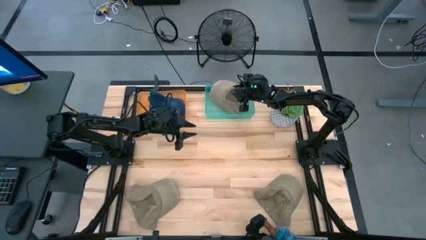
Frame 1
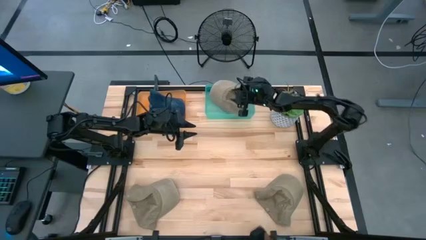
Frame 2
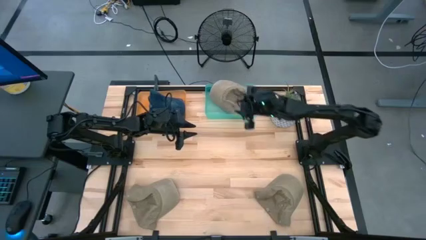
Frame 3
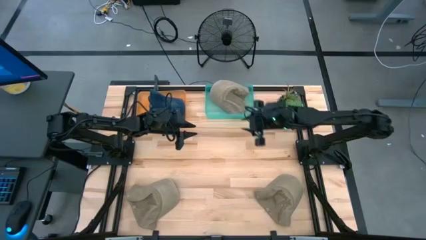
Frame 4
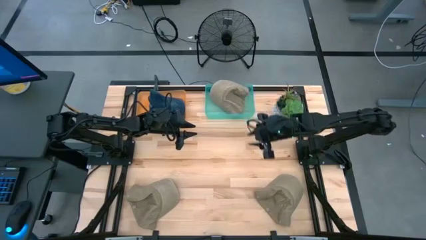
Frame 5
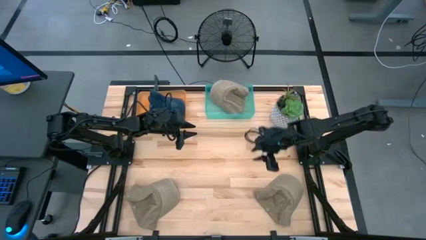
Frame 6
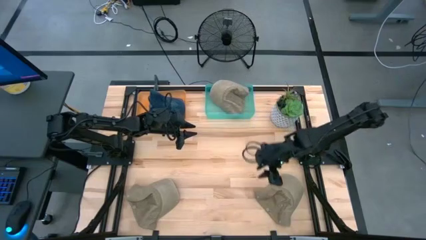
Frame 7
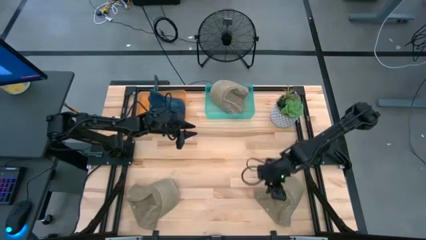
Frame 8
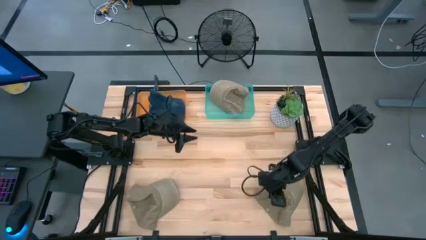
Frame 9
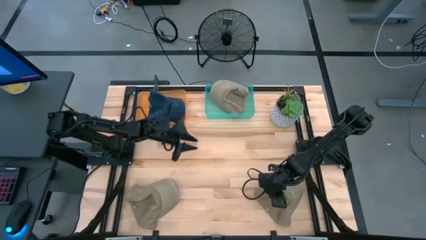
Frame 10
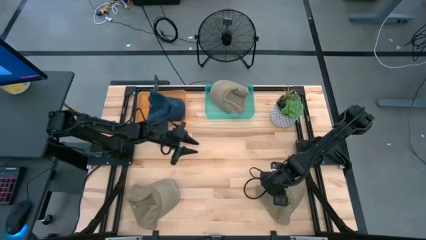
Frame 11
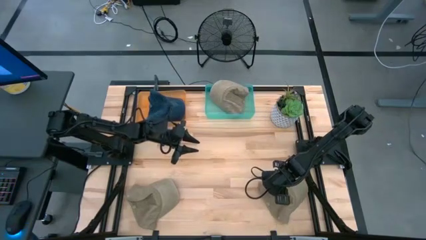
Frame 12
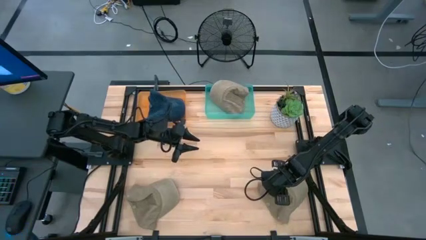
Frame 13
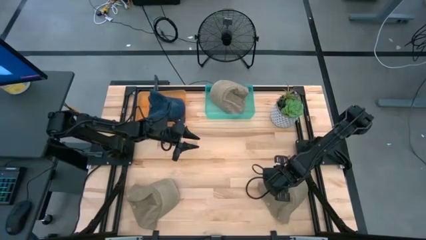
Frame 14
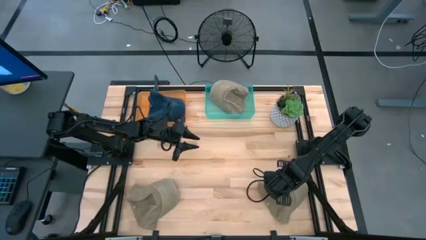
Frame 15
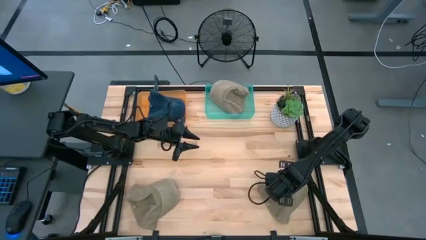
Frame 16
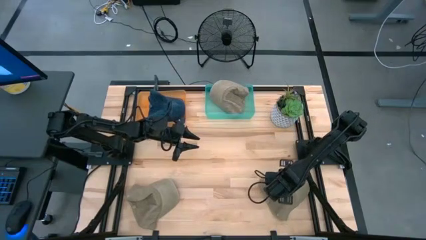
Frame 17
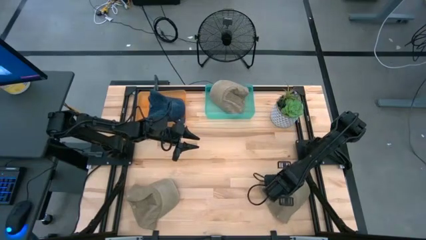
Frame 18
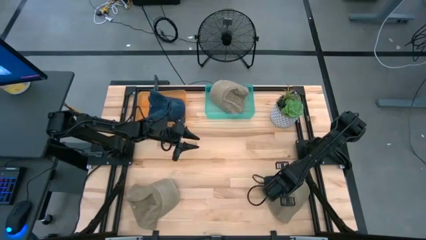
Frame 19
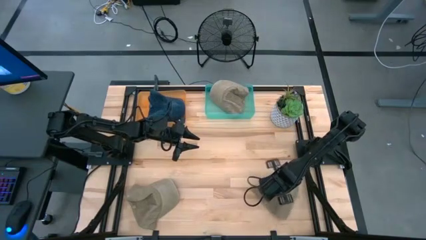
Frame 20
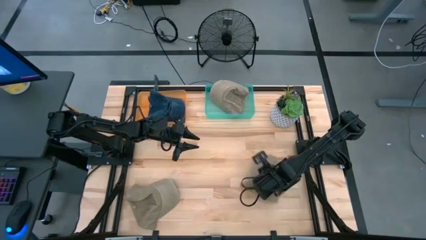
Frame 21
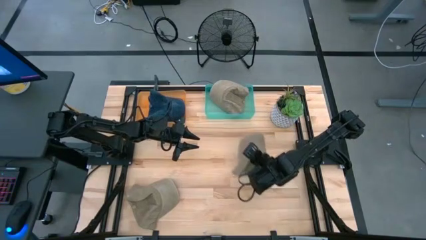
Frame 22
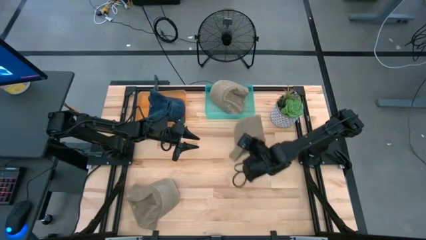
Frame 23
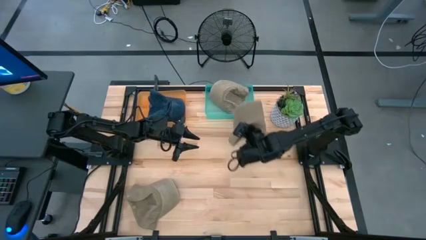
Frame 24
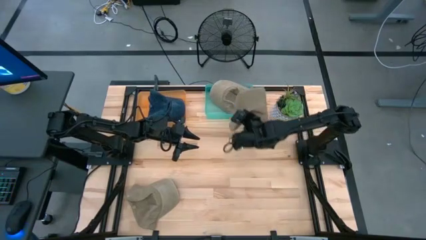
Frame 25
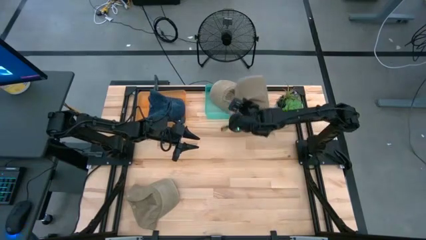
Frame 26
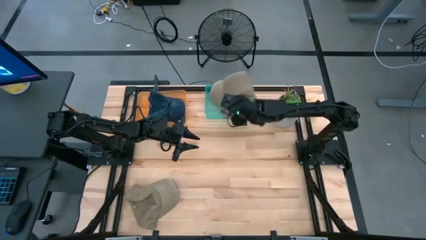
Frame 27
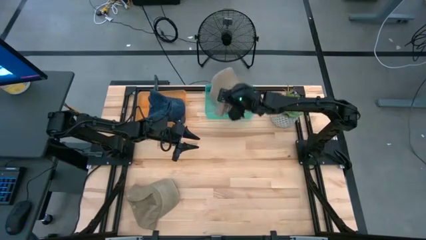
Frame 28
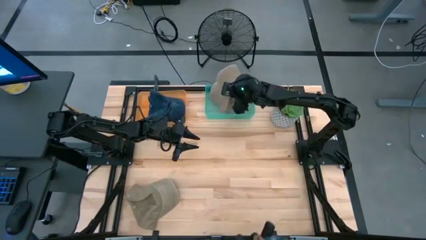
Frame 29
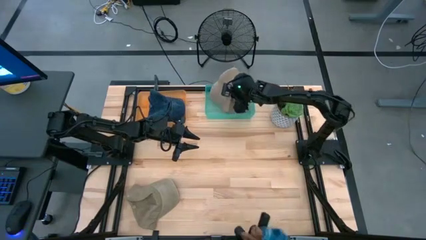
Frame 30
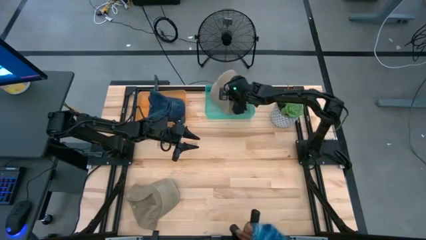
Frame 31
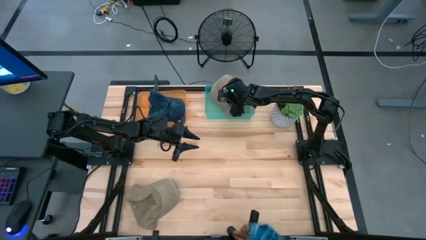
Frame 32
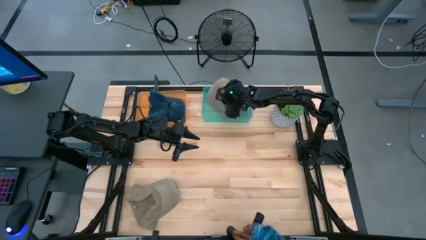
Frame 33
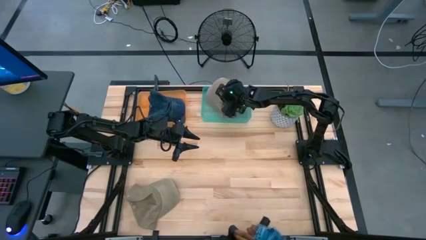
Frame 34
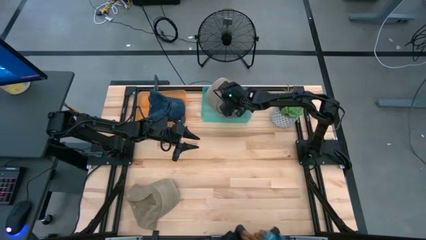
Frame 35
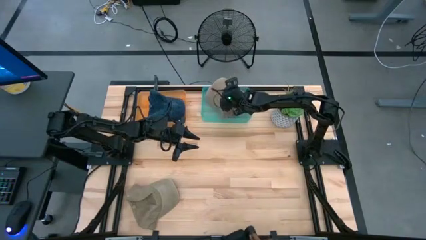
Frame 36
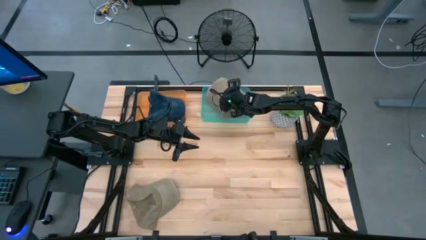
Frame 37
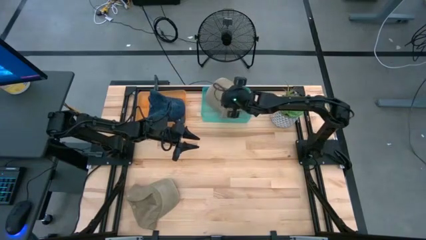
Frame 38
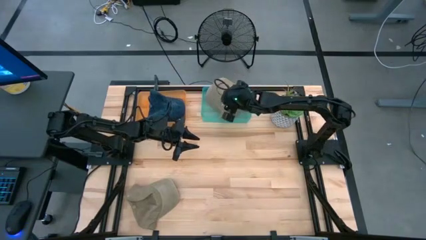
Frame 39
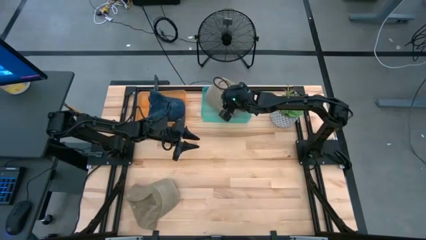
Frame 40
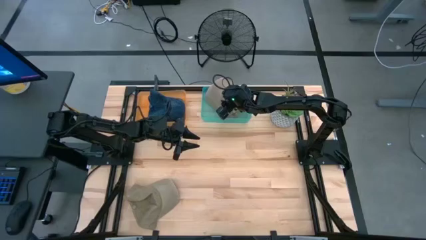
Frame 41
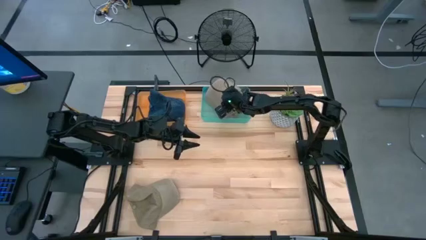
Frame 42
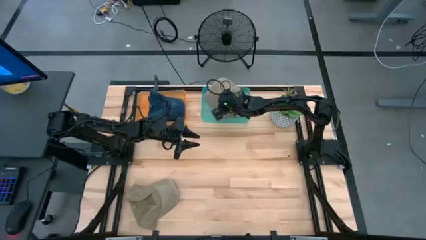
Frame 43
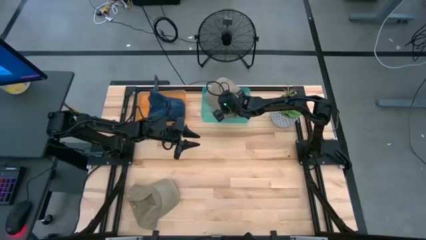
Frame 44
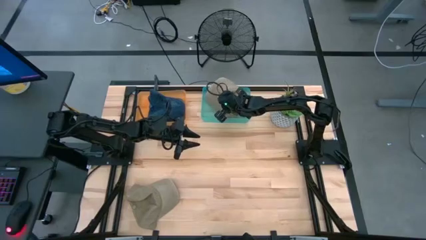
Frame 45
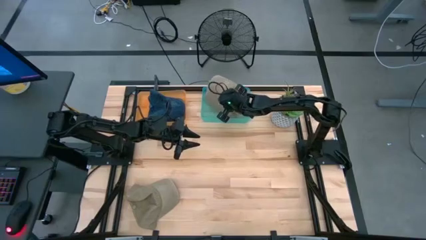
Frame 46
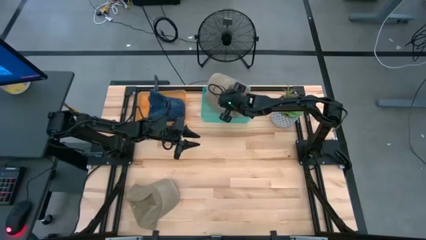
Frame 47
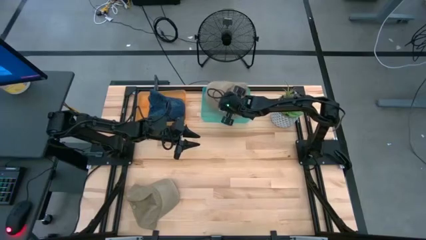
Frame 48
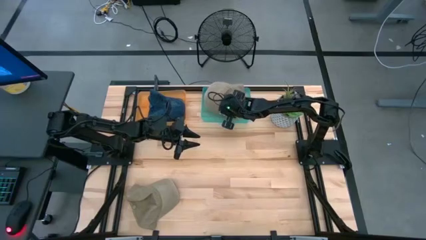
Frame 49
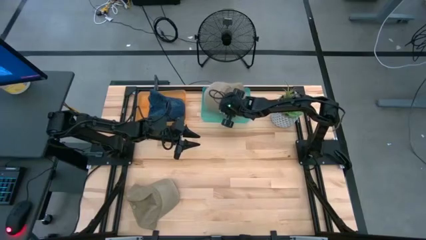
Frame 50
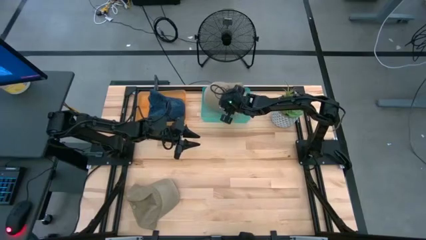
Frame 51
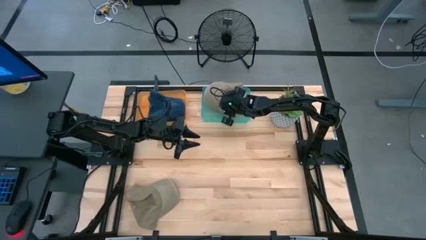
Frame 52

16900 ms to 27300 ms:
Task: Pick & Place hat
Put the right brown cap into the green bin

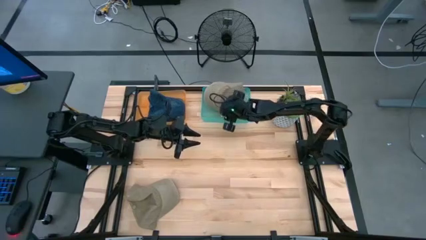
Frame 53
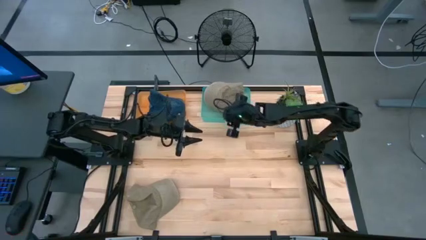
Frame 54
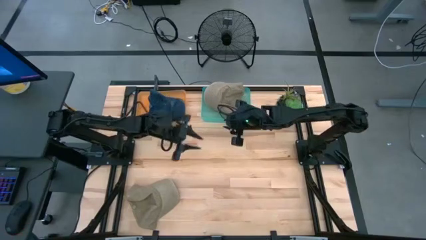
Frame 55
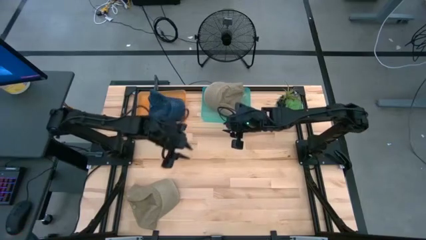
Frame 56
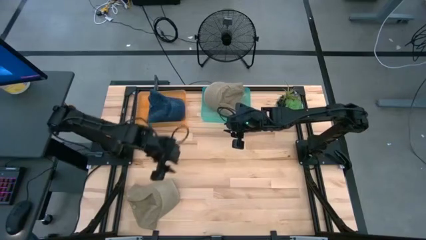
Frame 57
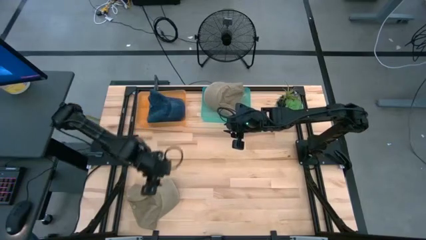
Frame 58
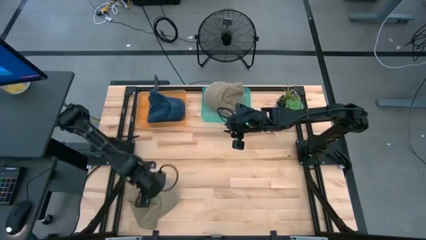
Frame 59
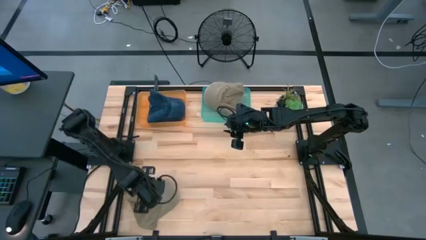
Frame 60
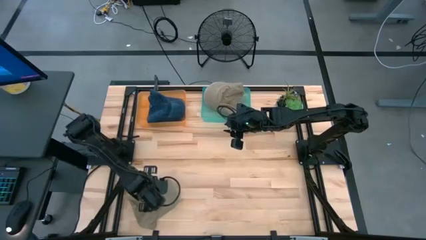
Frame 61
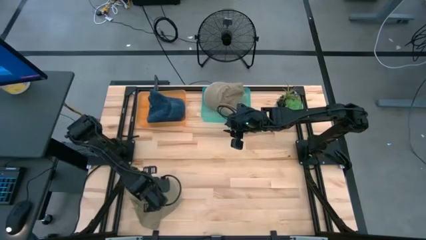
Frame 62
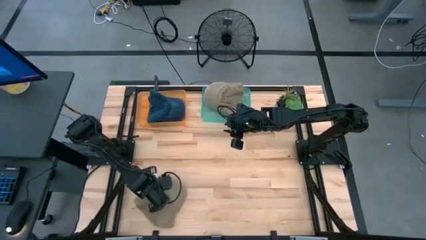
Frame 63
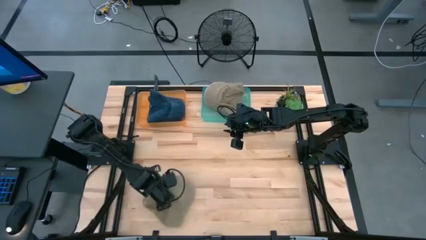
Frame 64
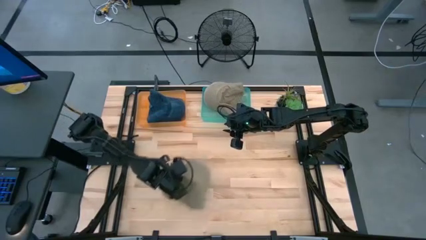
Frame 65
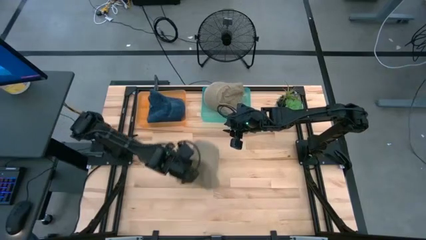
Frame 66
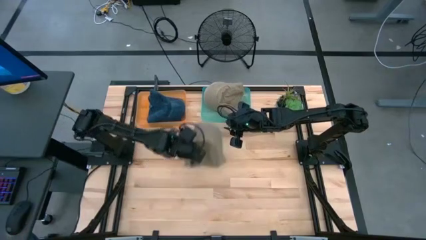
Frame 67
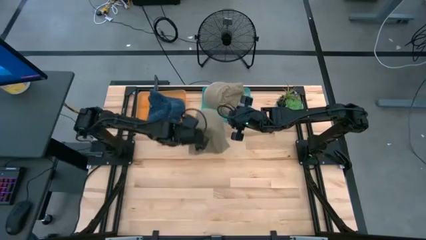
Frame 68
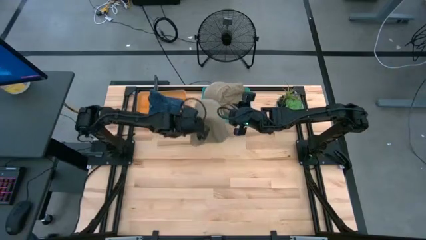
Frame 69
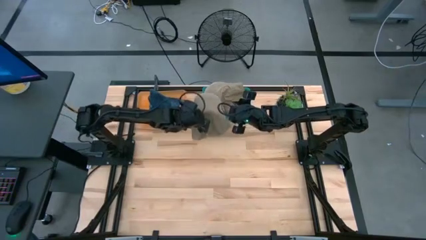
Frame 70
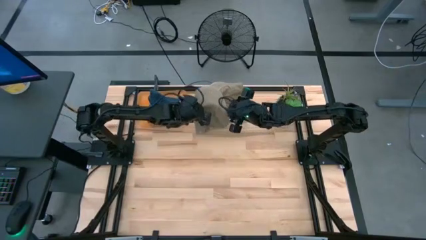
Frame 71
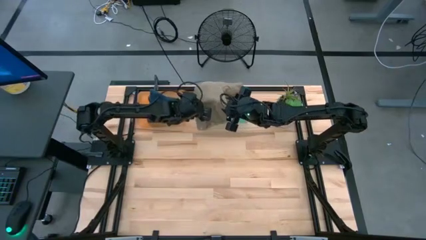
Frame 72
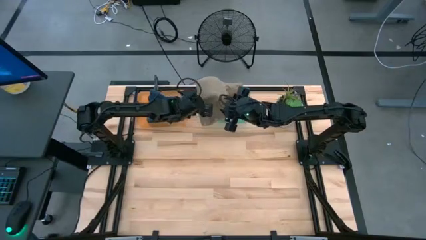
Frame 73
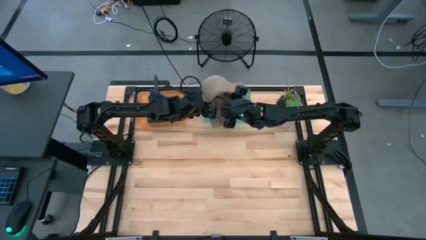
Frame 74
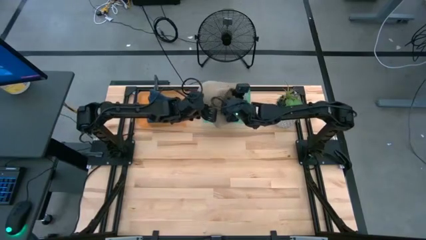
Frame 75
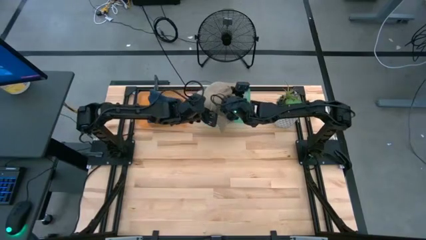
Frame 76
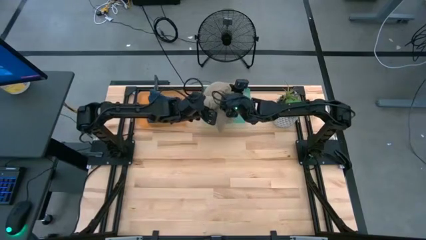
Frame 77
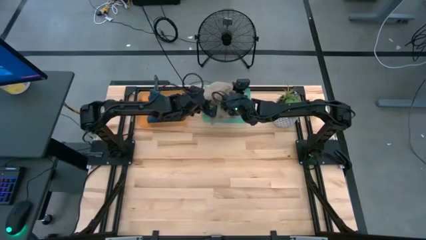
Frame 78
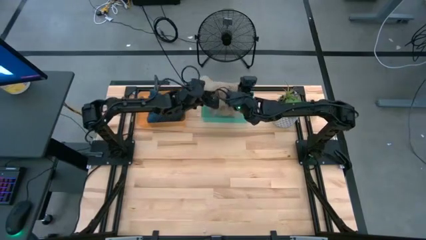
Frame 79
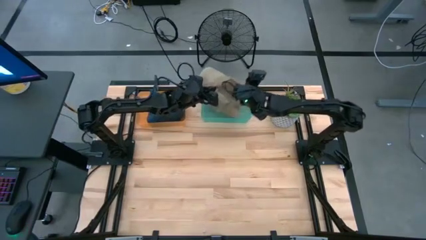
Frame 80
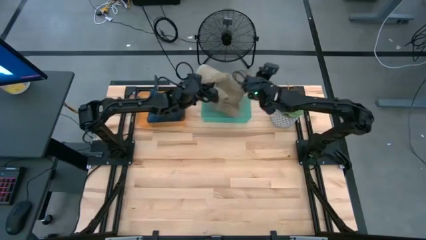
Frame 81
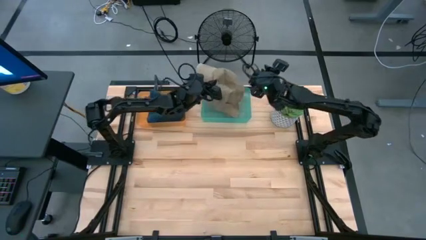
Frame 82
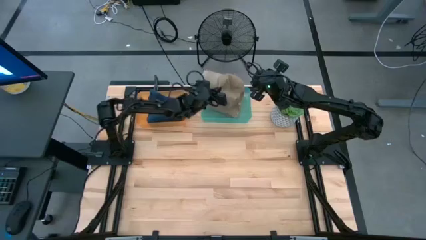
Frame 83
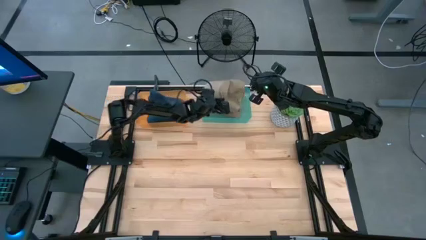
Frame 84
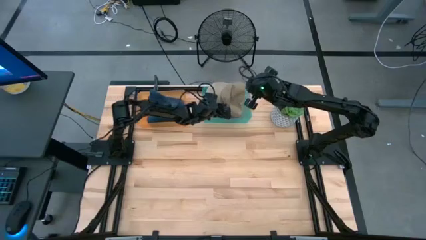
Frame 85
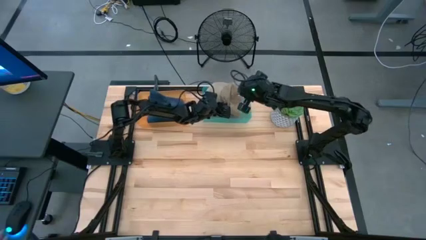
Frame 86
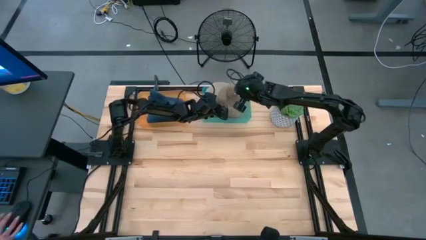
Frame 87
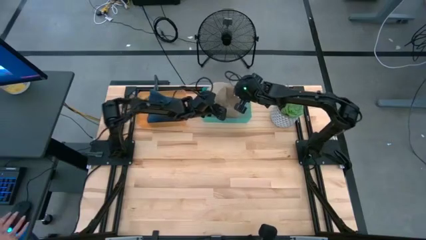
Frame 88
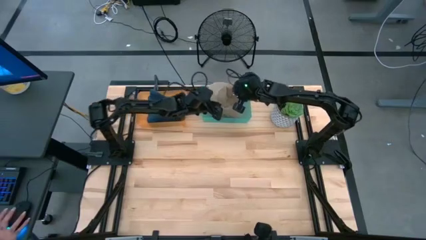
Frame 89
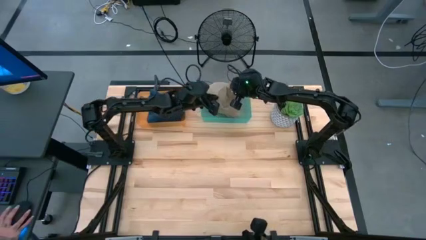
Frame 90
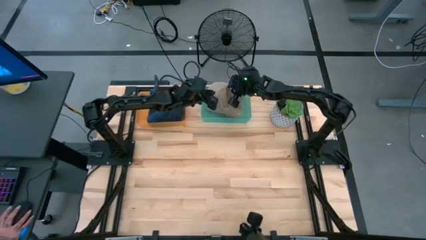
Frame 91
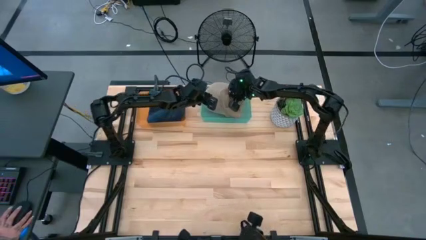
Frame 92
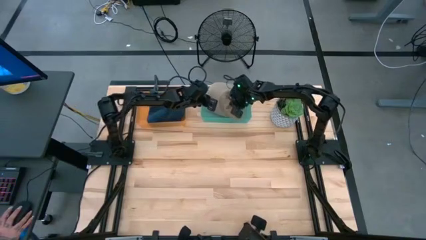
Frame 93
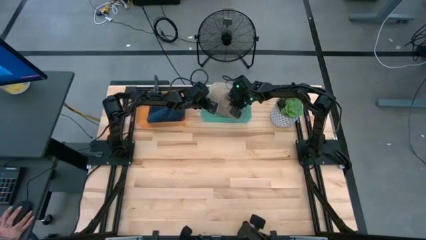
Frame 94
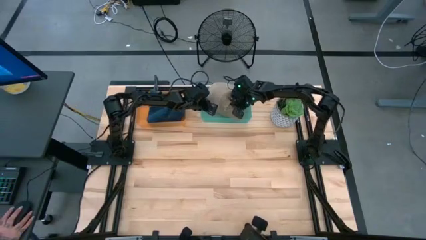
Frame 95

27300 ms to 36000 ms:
Put the brown cap into the green bin
